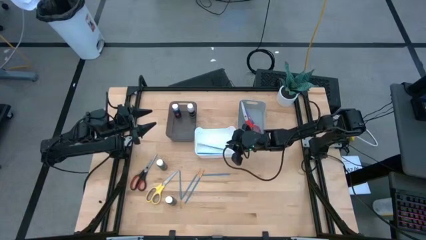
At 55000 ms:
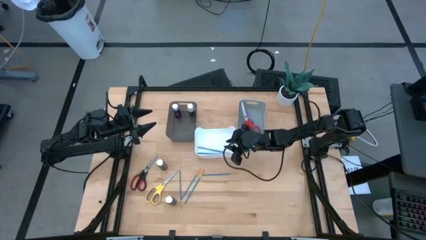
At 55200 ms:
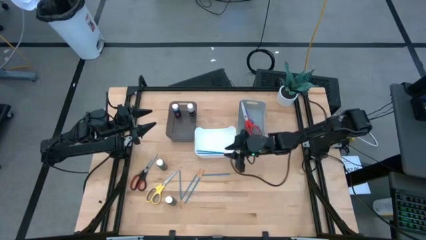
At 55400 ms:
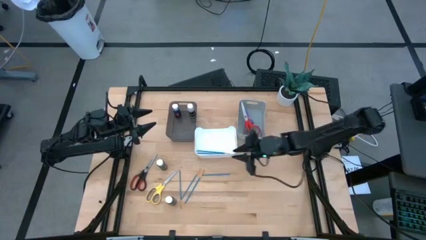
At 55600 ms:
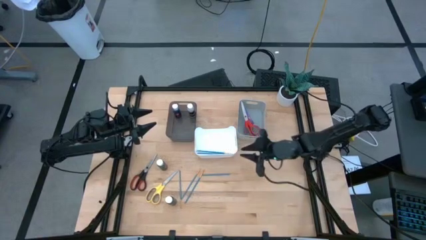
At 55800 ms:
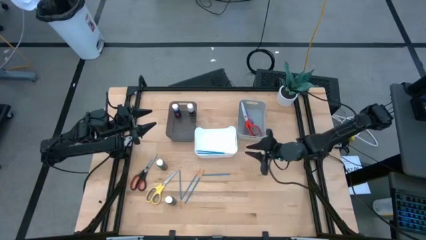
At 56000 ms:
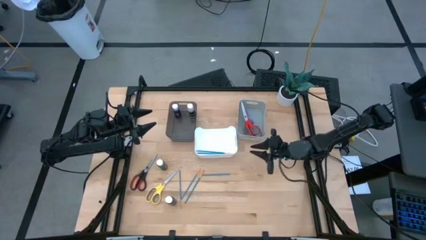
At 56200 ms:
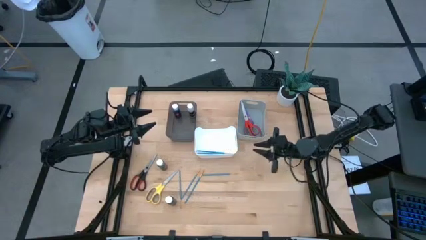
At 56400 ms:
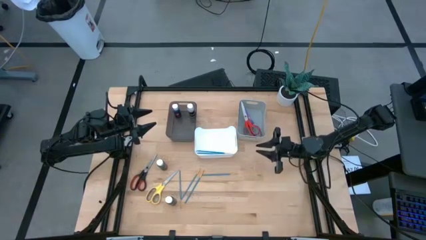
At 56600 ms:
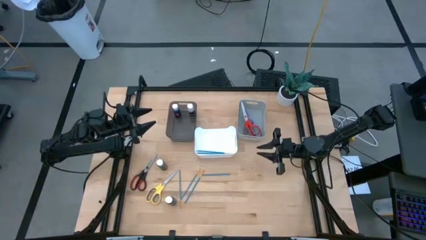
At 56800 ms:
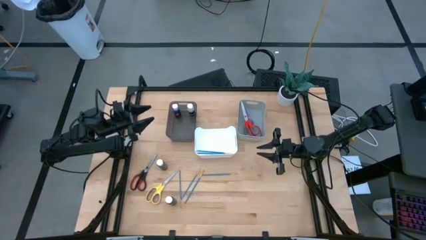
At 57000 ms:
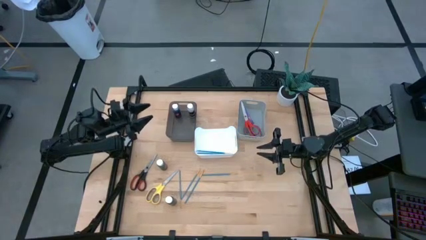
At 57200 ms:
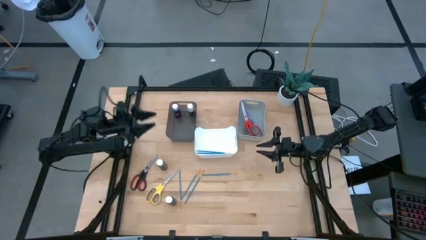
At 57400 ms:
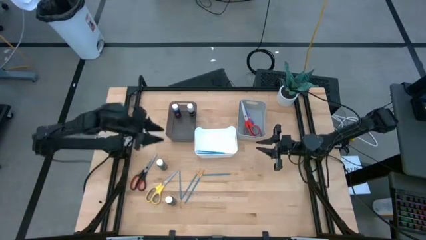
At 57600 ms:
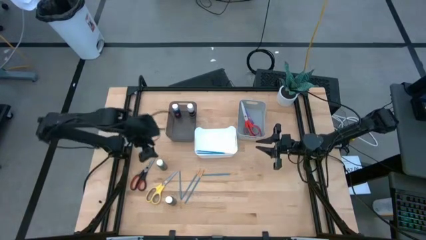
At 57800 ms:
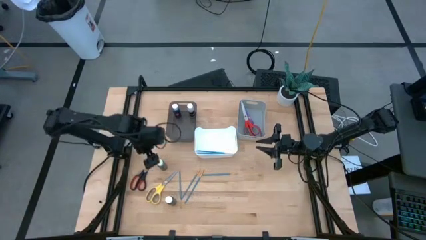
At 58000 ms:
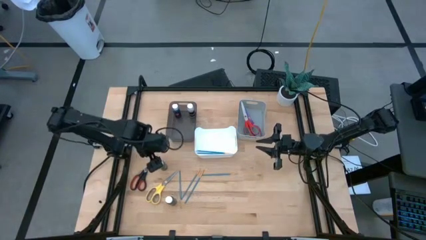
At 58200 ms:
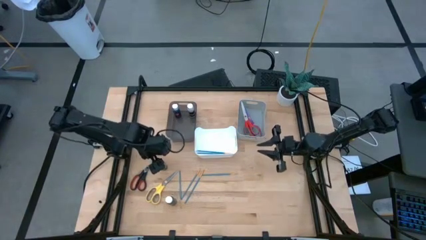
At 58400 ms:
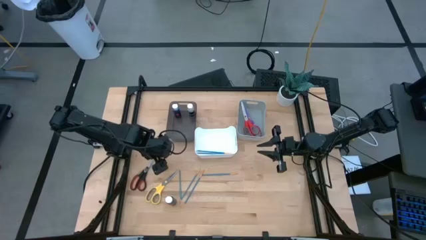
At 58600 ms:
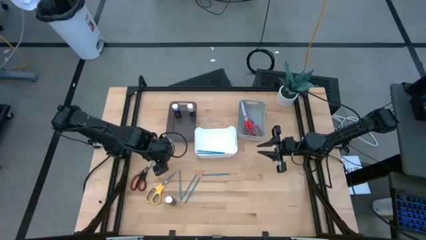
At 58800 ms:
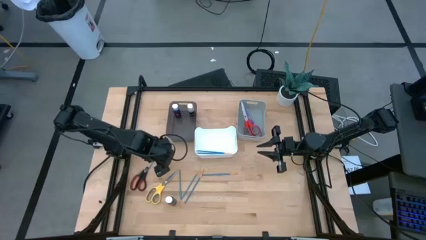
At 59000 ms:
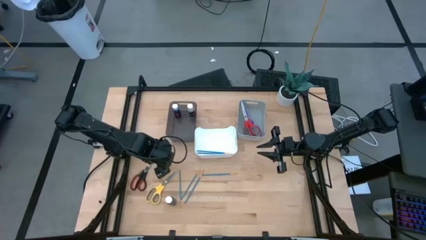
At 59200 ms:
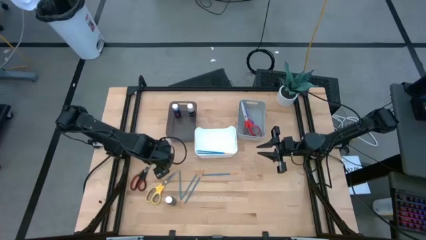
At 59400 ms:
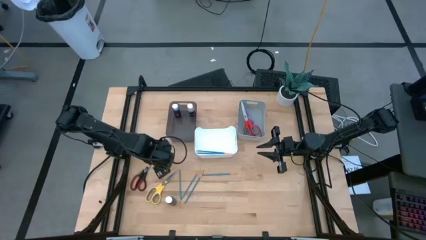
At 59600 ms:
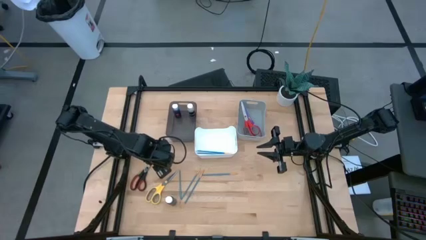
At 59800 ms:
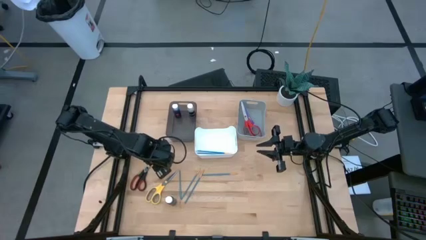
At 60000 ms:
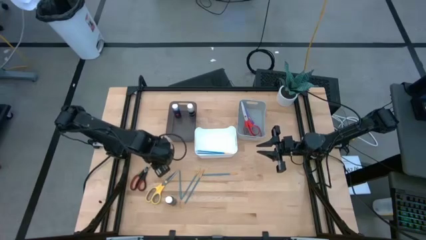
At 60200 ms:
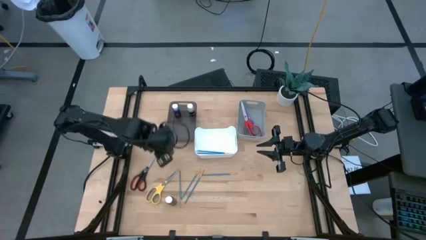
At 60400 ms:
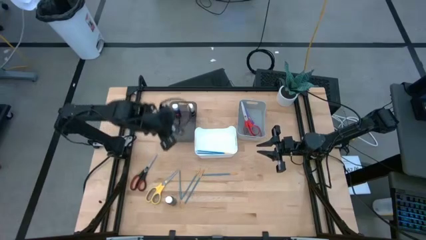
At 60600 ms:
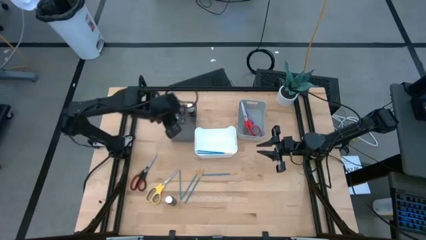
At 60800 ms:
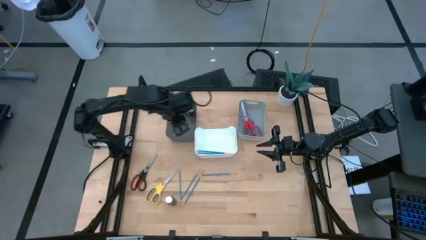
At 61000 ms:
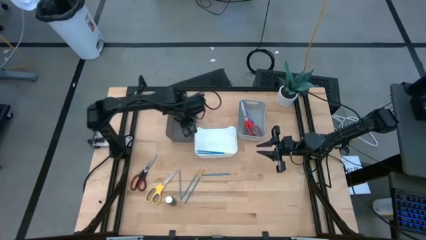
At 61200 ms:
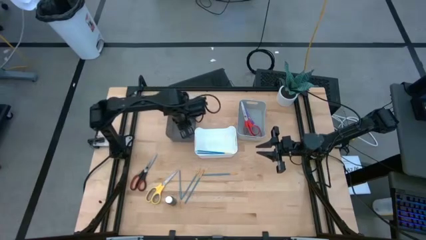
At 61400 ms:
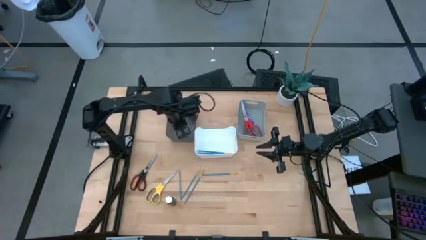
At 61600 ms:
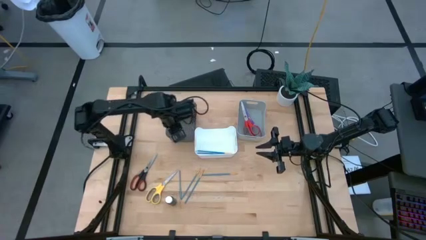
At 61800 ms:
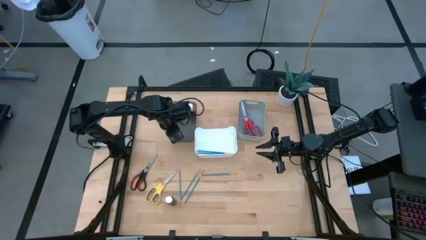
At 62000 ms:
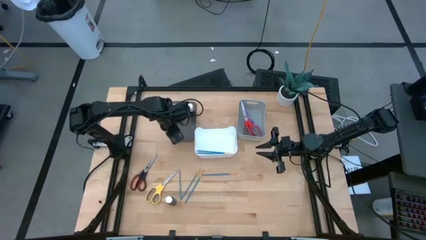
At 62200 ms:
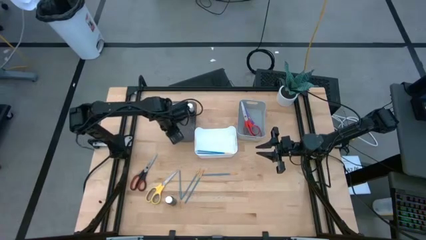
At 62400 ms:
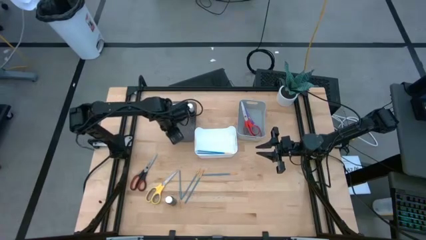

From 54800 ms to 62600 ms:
Task: Pick & Place Paint Supplies
Put the green paint bottle into the black bin

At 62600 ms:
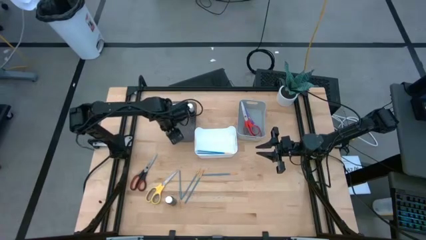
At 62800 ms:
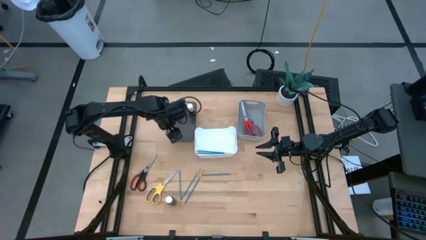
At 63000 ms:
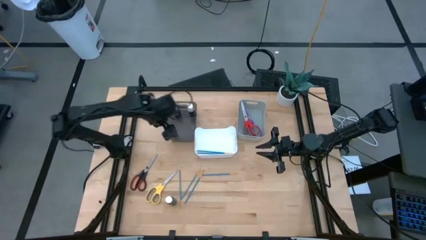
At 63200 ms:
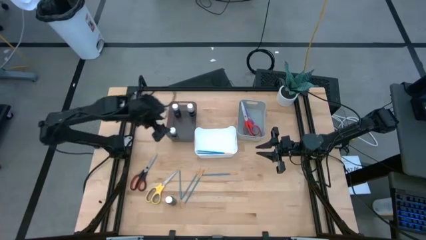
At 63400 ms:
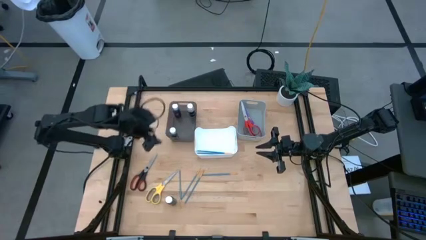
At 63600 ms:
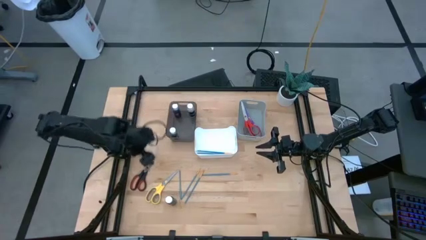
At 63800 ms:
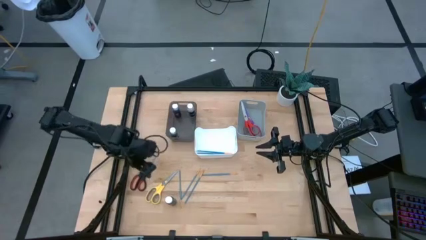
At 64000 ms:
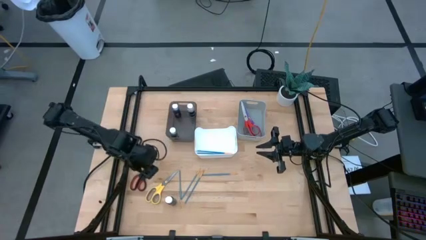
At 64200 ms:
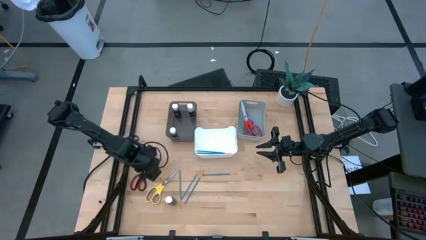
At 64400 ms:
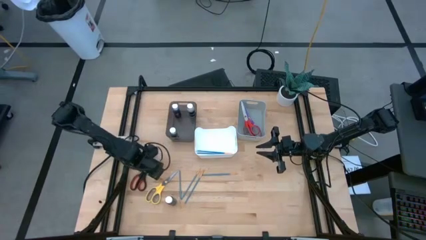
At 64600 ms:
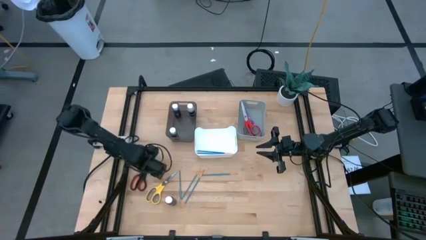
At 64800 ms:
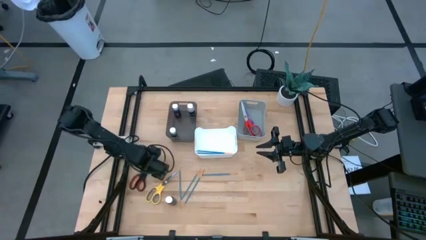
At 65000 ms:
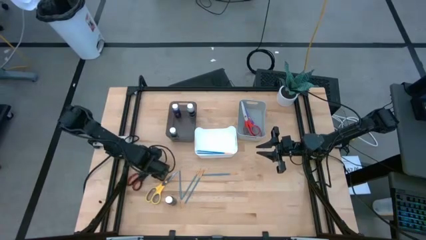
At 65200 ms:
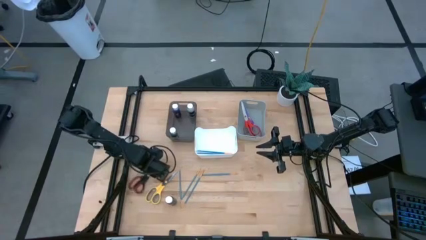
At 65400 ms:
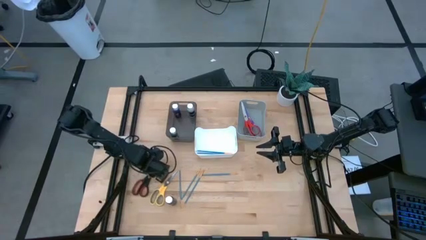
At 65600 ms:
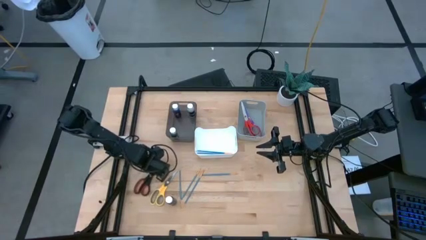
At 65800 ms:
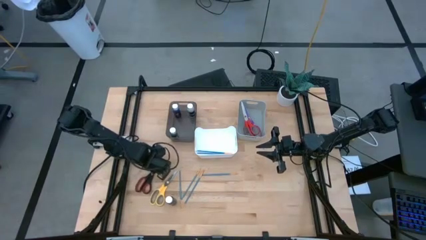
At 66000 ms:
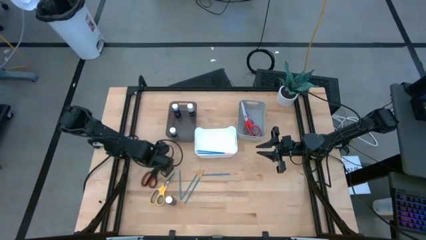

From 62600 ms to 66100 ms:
Put the black scissors into the gray bin
